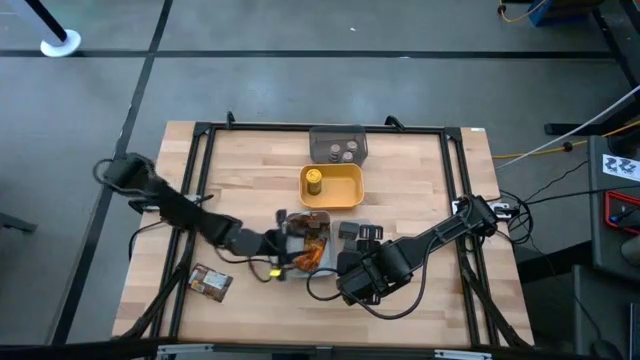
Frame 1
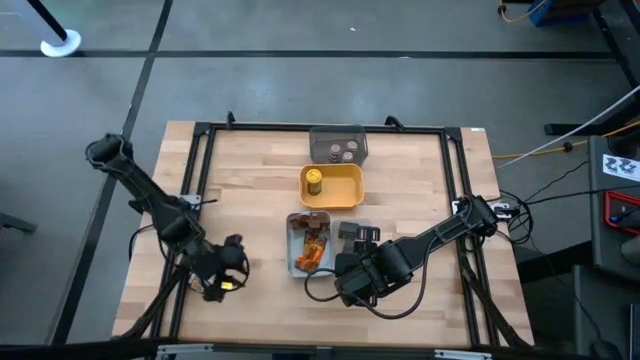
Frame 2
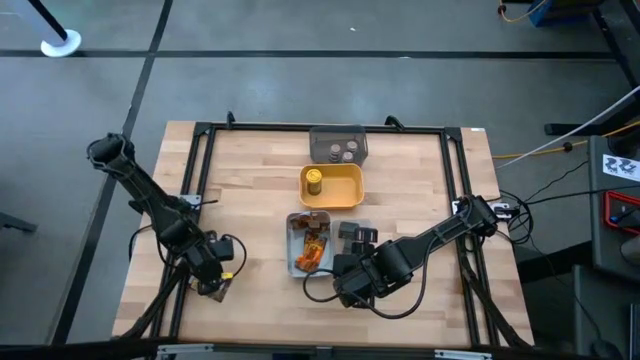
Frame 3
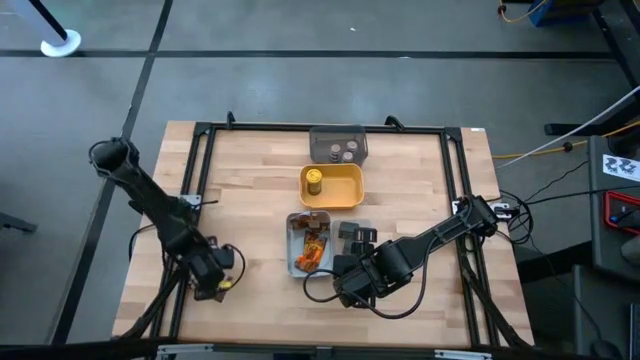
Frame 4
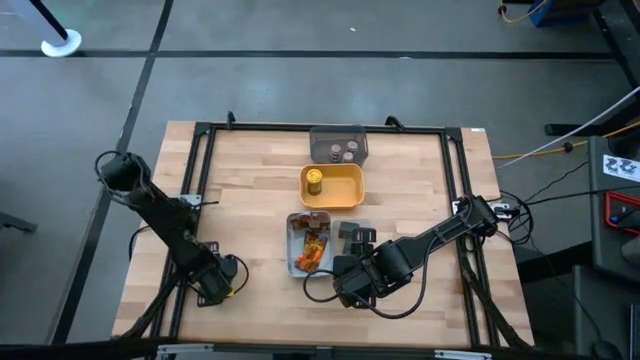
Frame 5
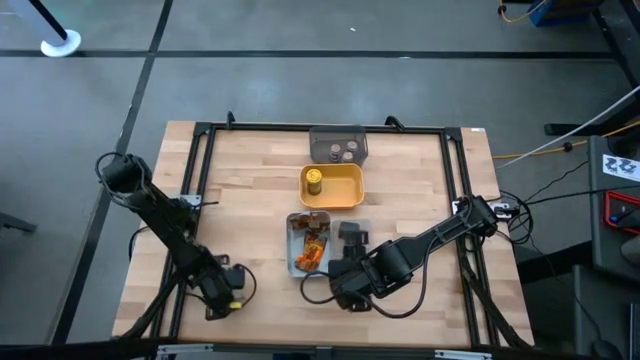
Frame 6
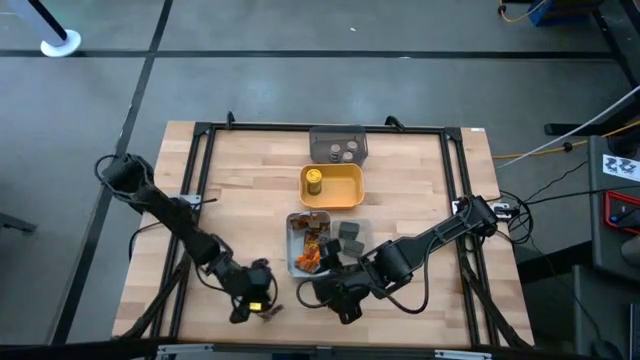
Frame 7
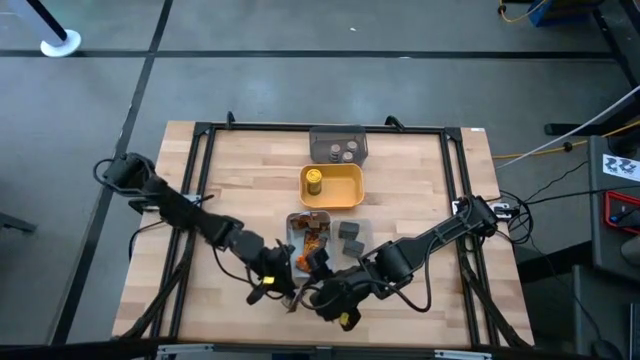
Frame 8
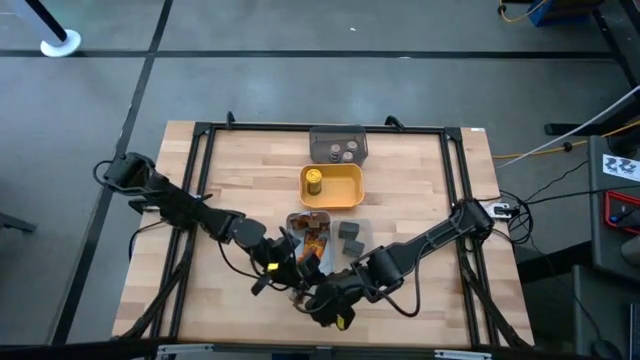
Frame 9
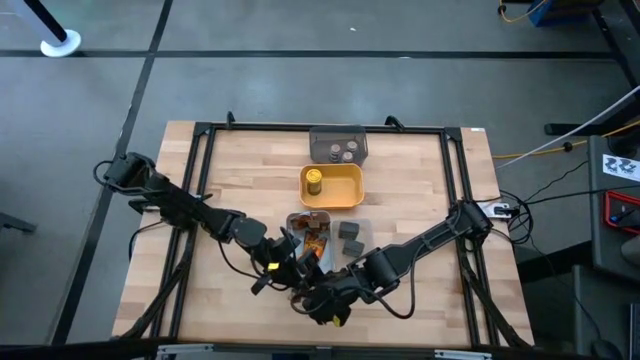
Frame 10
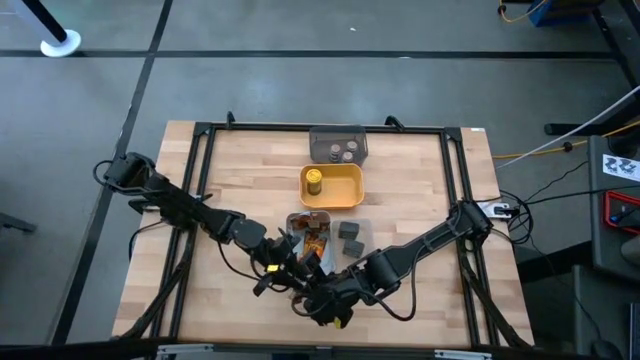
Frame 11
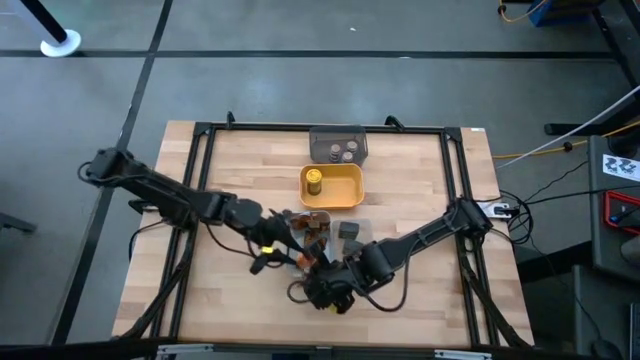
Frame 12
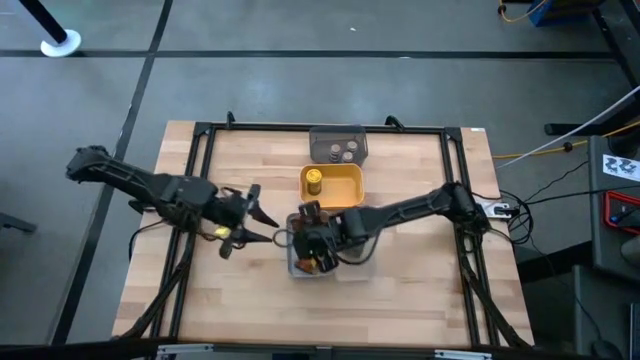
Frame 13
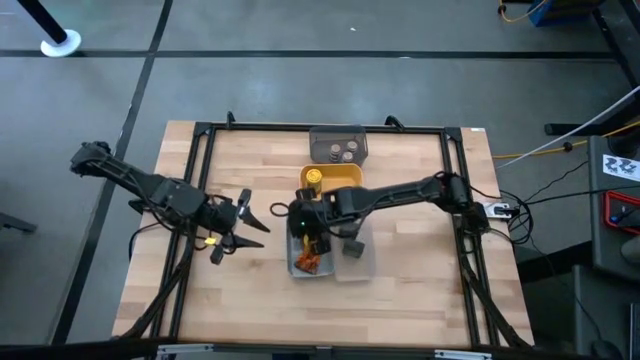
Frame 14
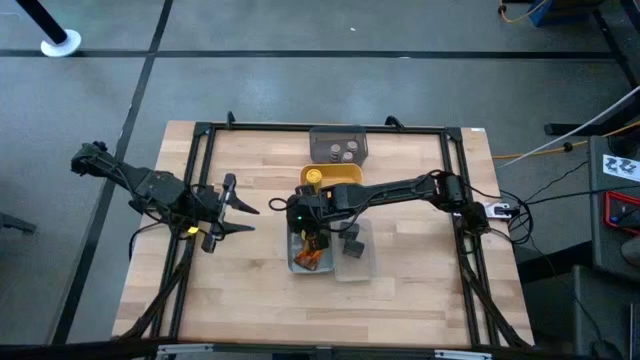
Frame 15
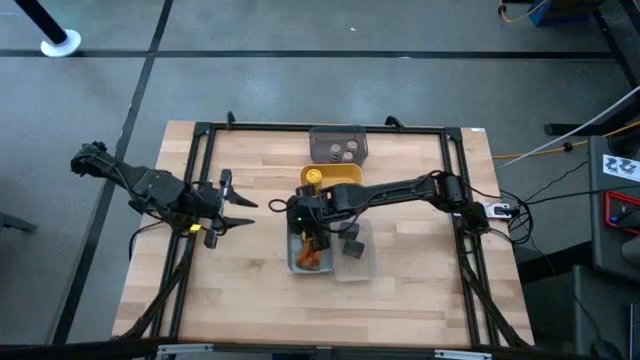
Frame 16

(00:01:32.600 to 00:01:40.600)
Task: Sort spices by type
Put the brown seasoning pack into the gray bin

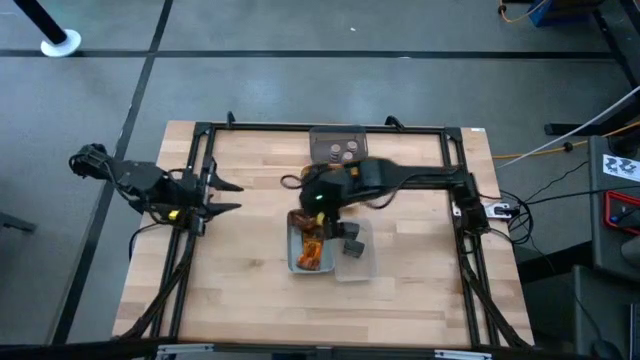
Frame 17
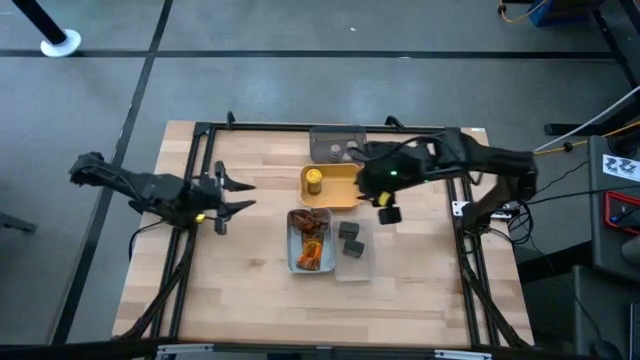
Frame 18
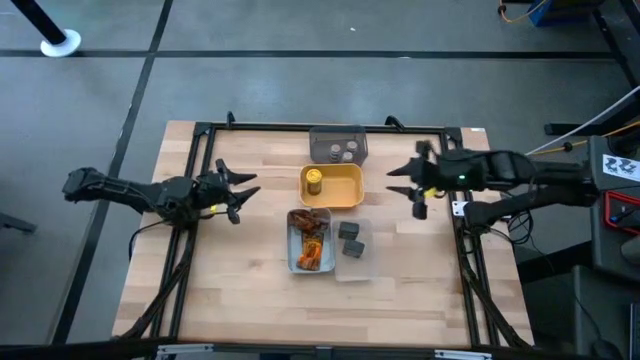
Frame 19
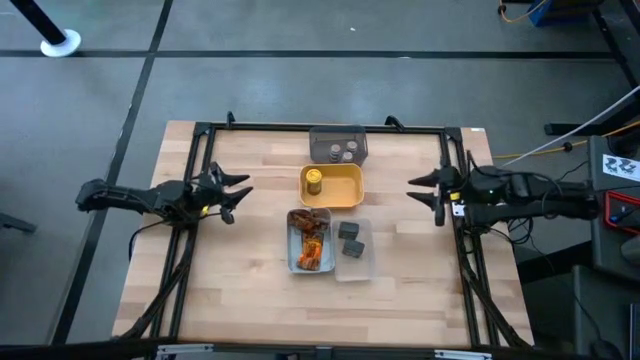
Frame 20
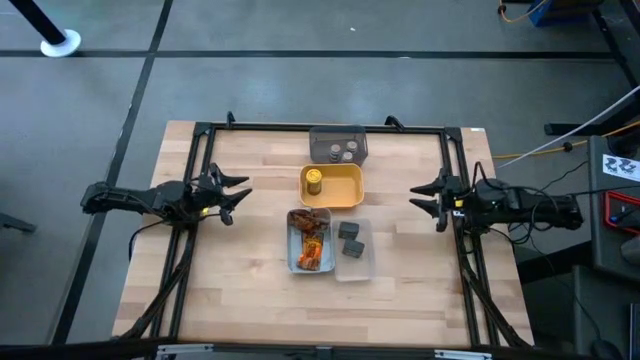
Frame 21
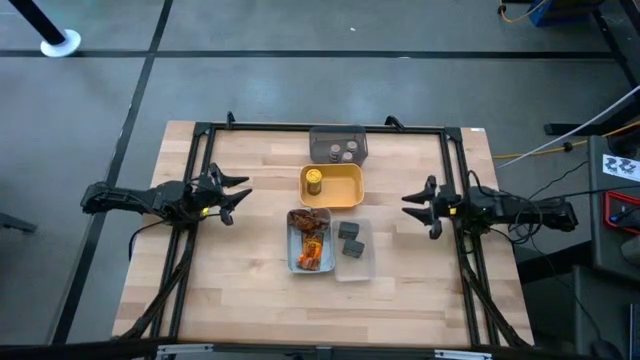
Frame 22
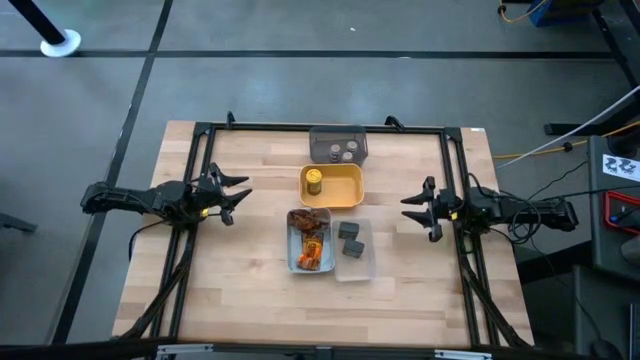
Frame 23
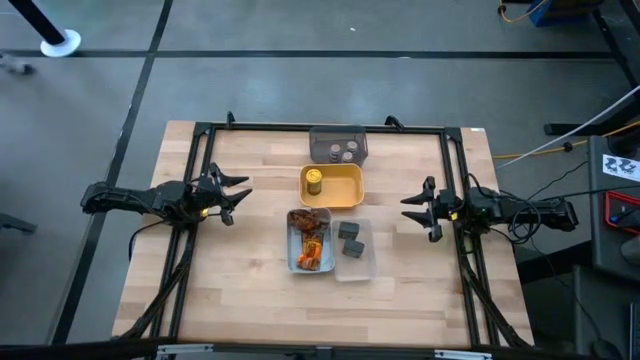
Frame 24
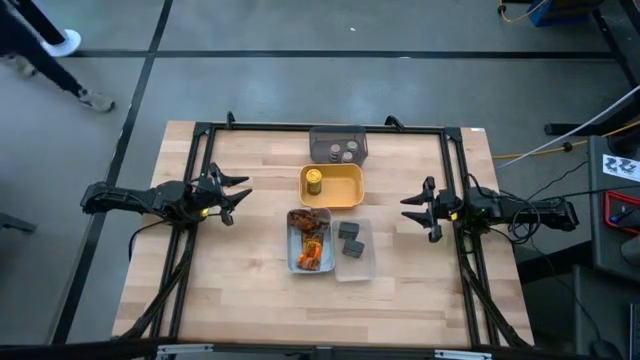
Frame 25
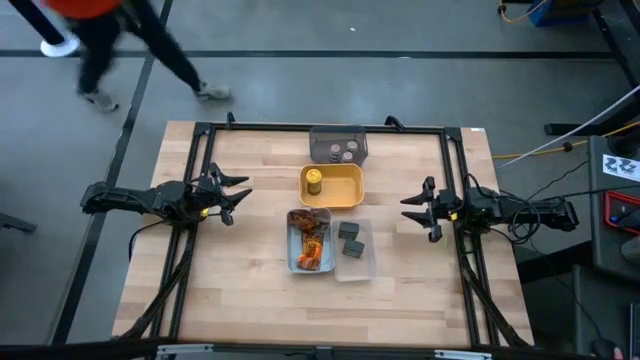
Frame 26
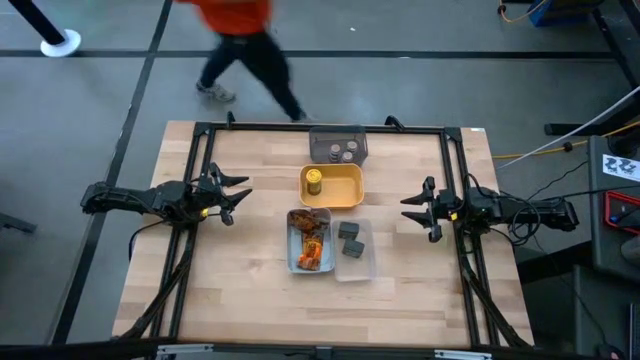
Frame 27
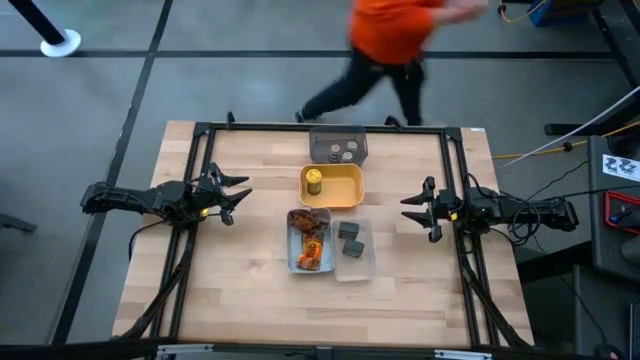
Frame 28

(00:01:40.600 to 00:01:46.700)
Return to Home Position

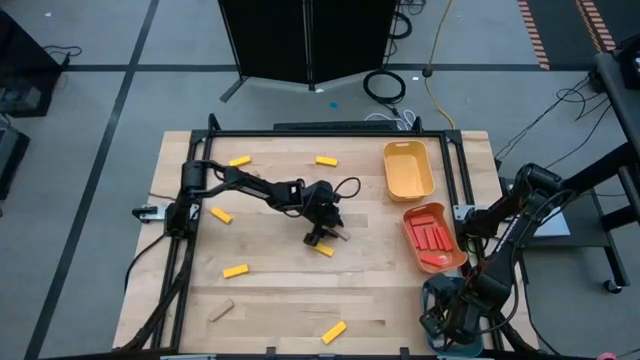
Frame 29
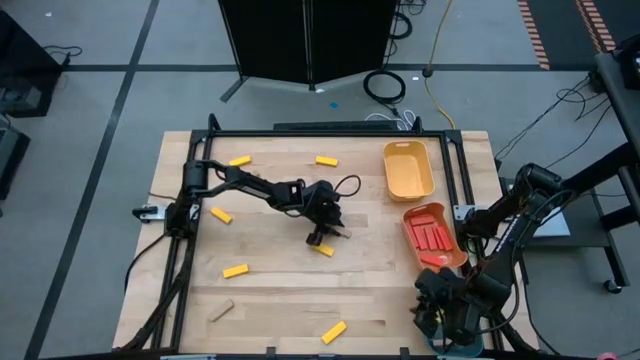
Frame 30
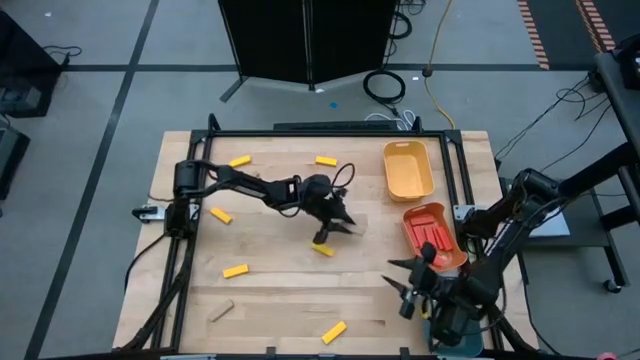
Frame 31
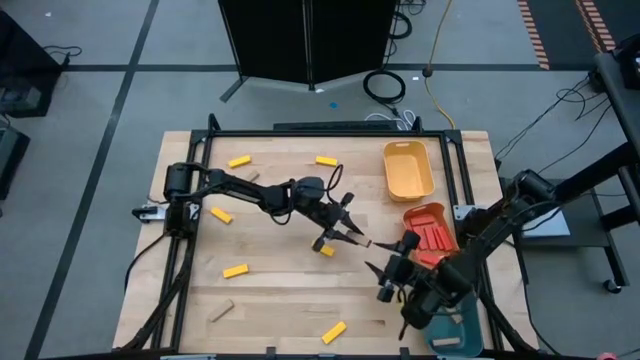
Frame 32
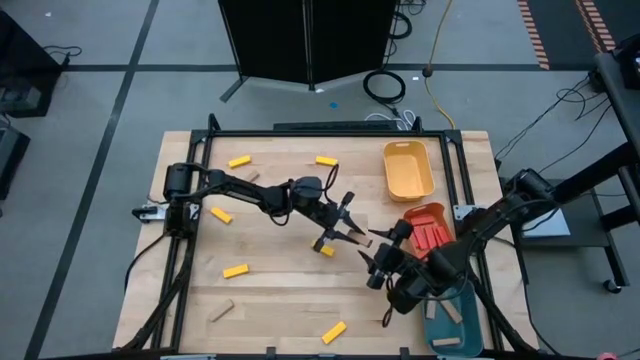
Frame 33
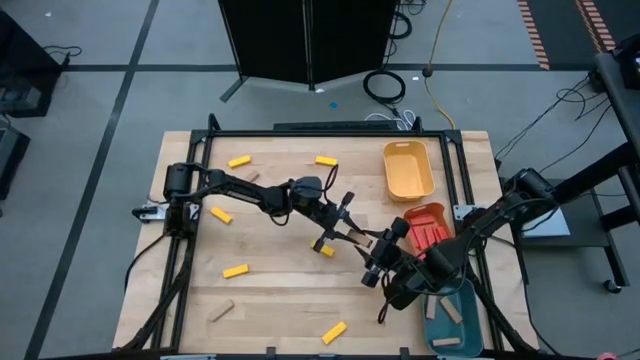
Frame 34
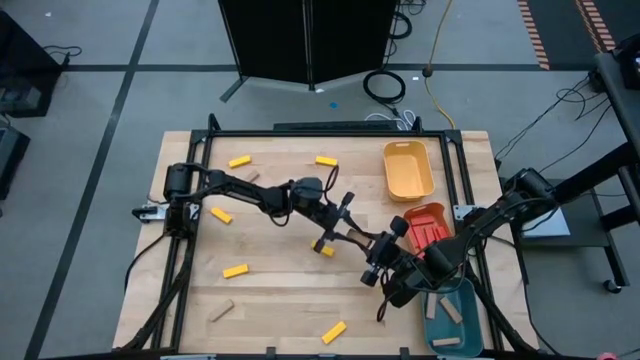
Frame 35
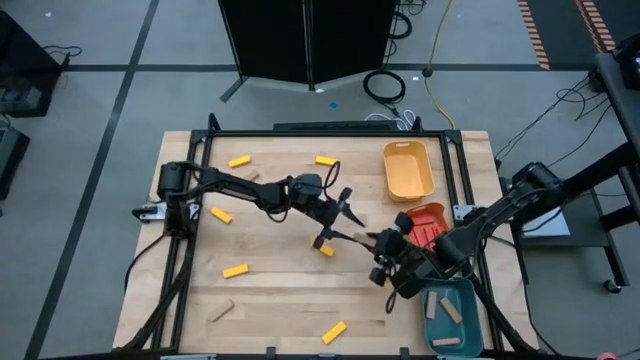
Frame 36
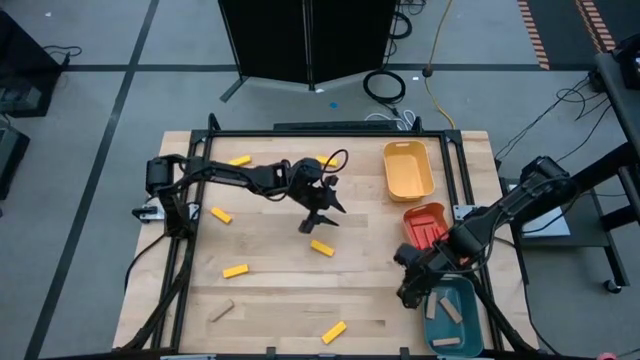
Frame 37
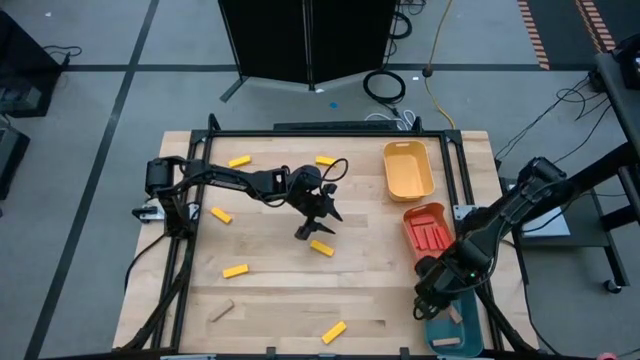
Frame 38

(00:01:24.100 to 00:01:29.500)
Task: Sort blocks
Put the brown block into the blue bin
